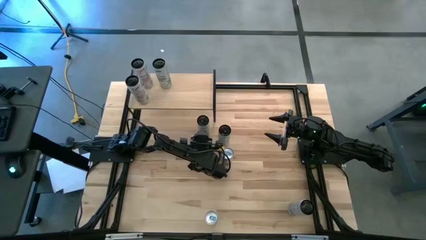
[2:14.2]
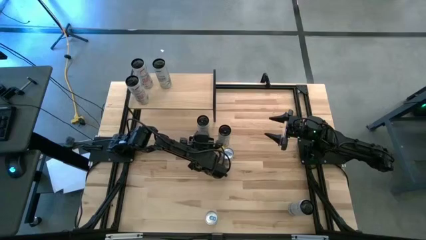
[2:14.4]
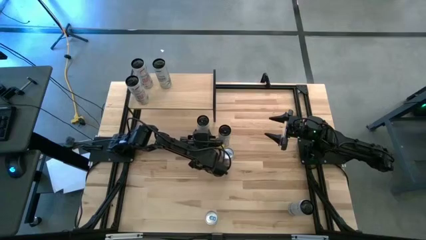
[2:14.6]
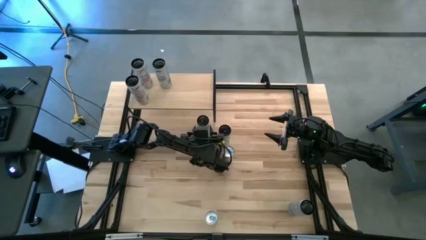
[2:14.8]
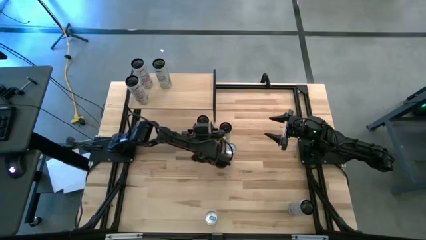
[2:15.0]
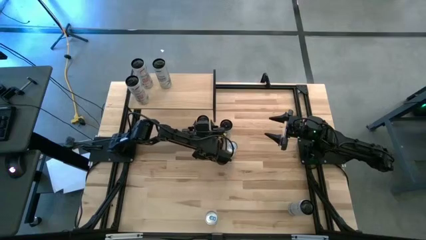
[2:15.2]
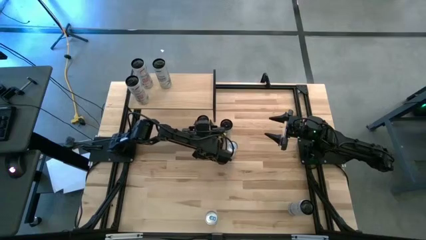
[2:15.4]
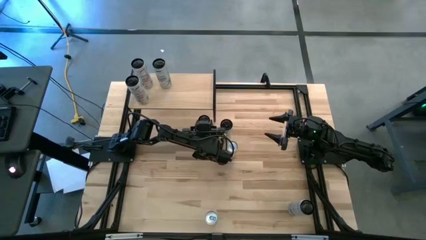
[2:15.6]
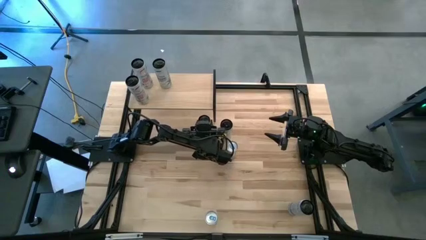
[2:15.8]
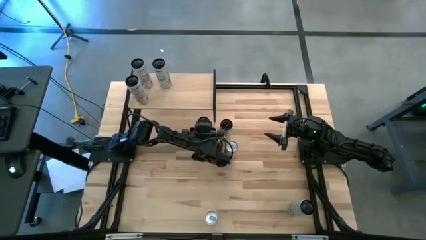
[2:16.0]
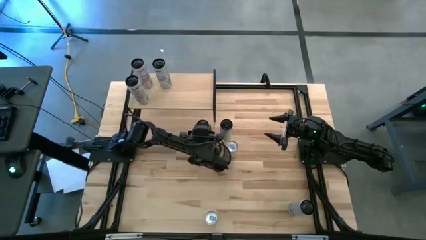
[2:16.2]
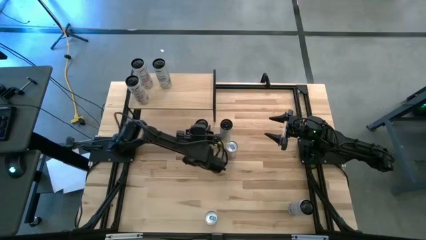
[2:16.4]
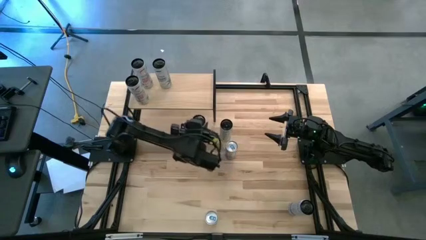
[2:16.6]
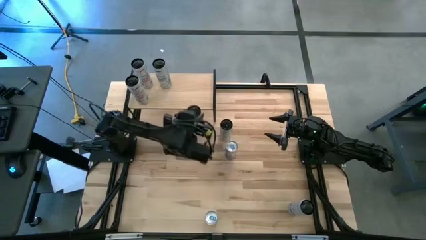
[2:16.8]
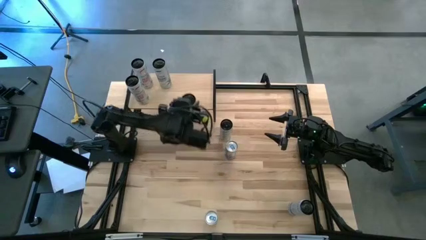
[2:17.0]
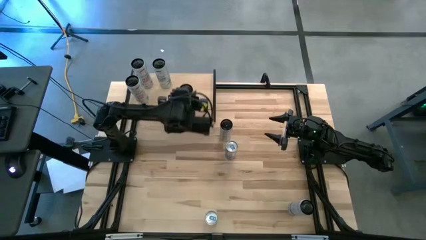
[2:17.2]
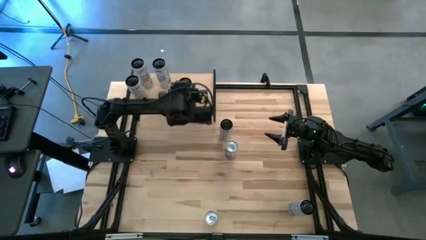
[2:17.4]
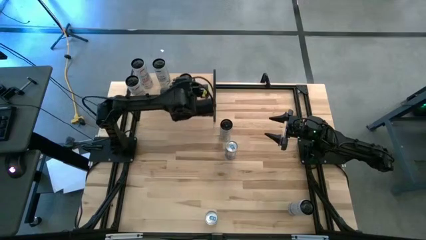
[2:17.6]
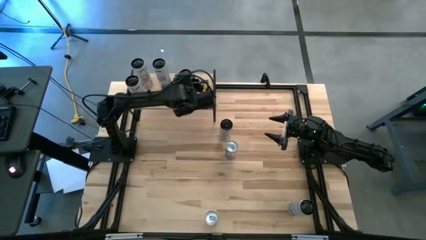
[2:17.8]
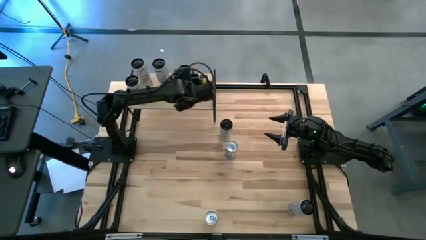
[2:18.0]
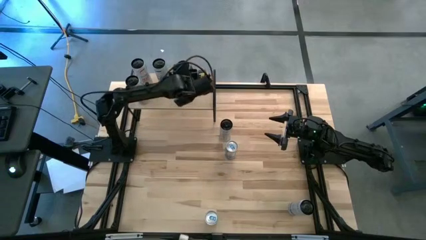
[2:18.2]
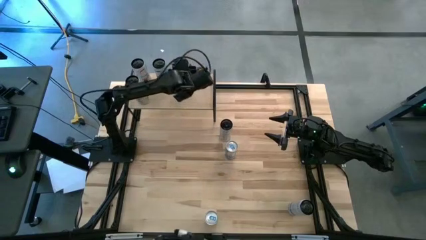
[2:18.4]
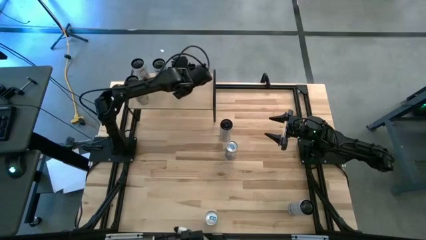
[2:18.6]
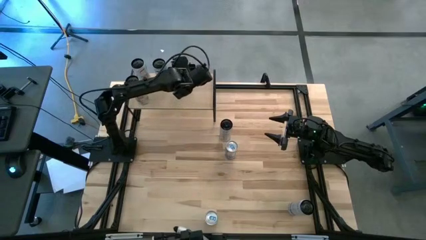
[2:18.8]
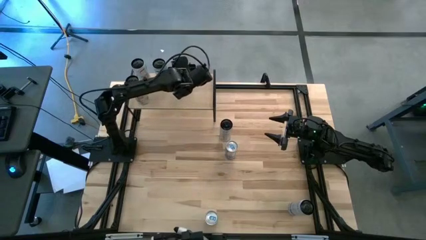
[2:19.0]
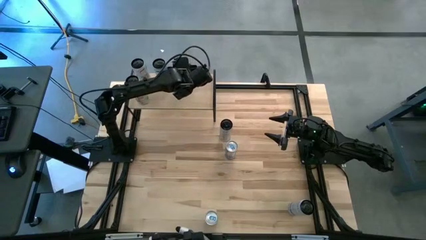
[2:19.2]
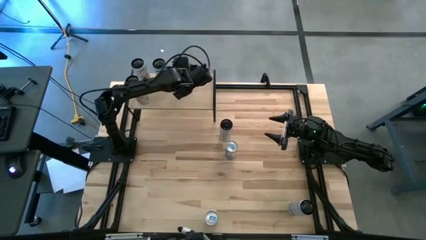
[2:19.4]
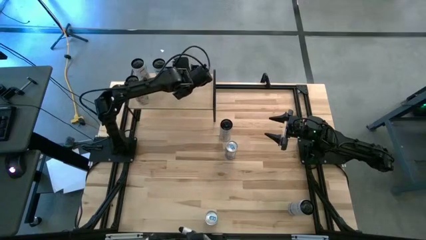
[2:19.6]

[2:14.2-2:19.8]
Task: Place canned beverage on shelf
Put the left white yellow soda can on the shelf

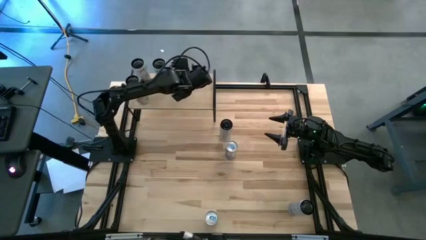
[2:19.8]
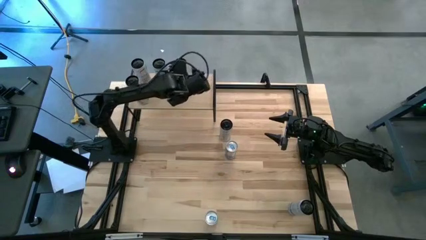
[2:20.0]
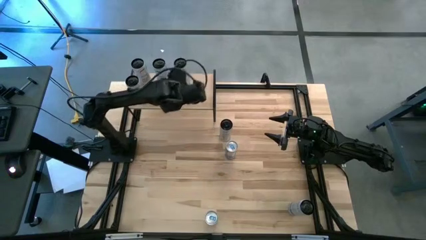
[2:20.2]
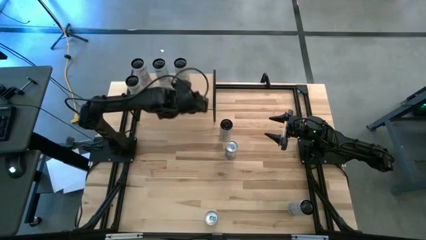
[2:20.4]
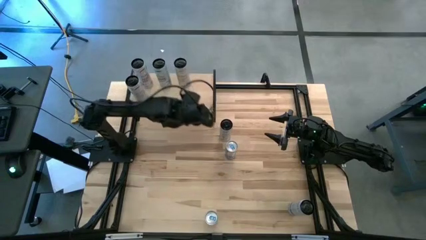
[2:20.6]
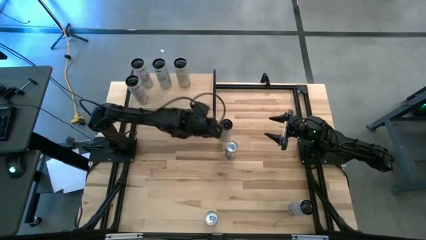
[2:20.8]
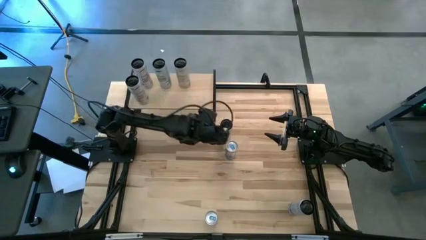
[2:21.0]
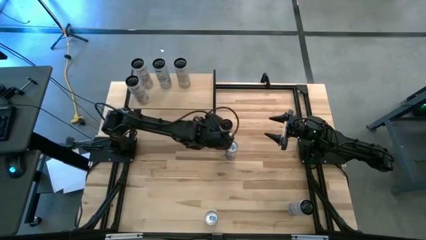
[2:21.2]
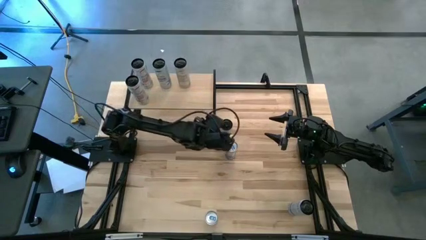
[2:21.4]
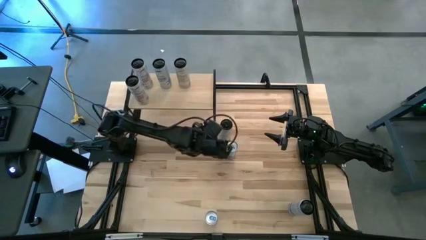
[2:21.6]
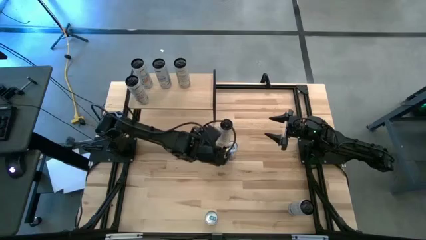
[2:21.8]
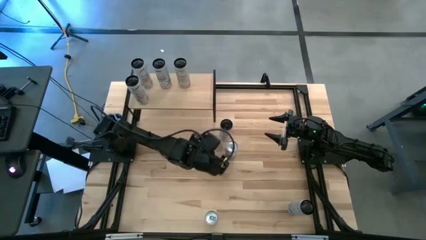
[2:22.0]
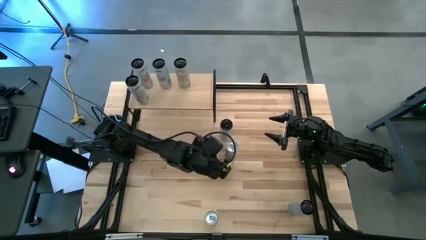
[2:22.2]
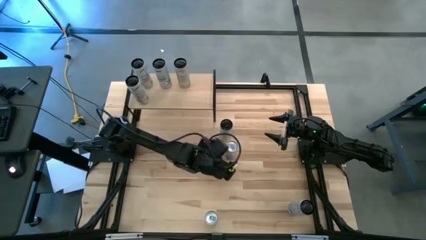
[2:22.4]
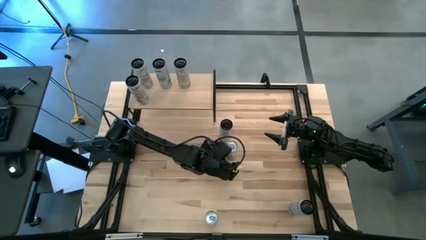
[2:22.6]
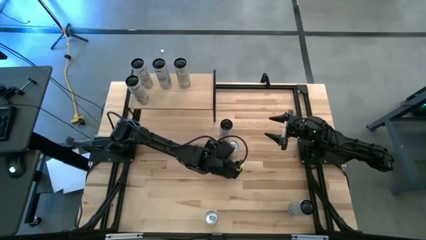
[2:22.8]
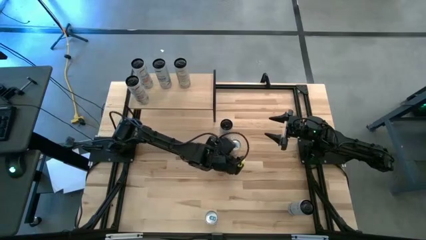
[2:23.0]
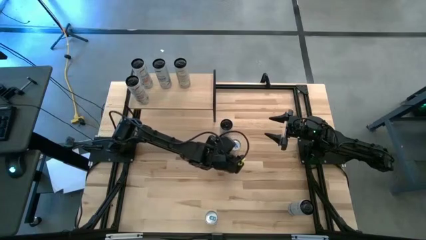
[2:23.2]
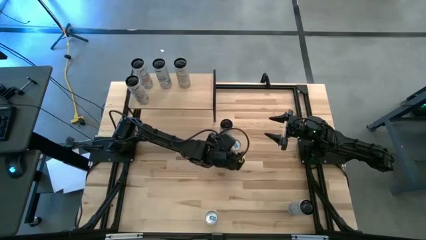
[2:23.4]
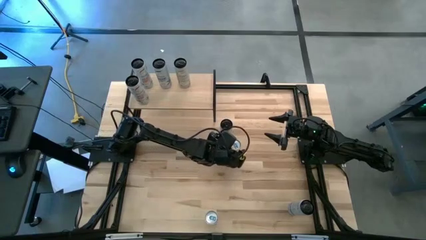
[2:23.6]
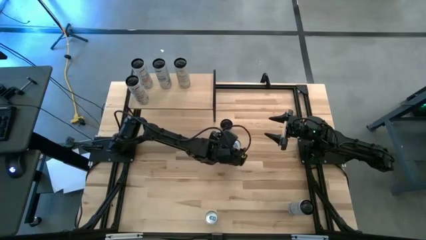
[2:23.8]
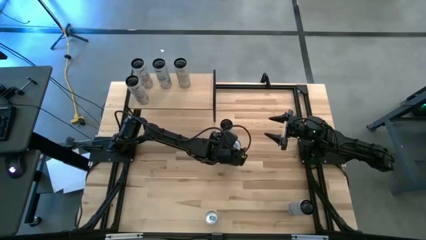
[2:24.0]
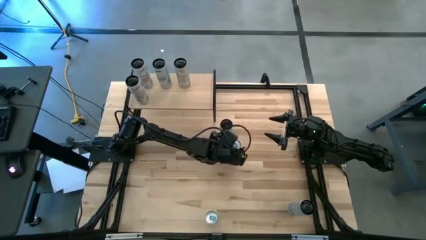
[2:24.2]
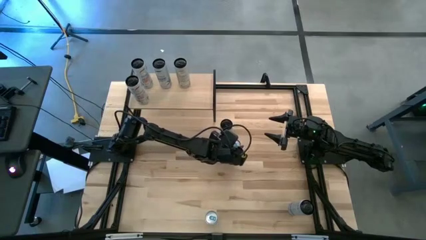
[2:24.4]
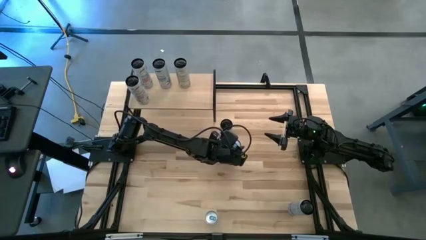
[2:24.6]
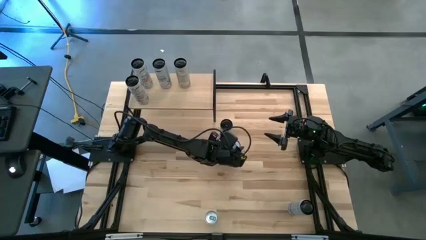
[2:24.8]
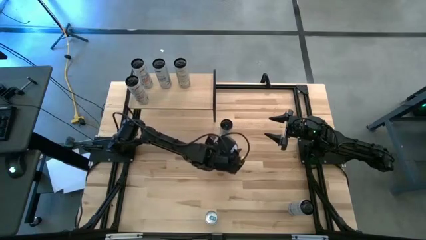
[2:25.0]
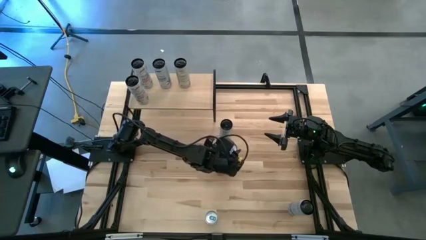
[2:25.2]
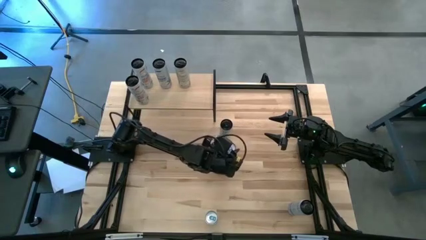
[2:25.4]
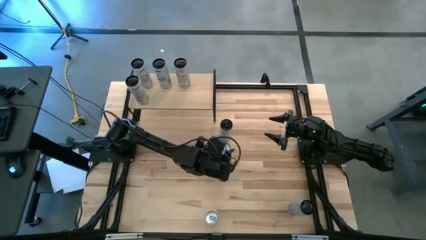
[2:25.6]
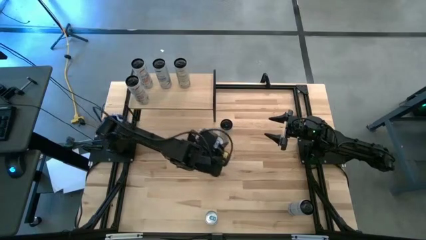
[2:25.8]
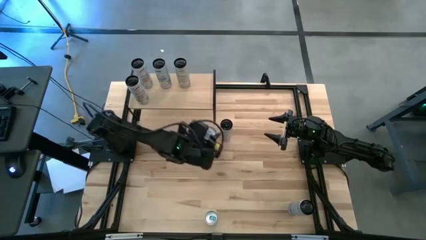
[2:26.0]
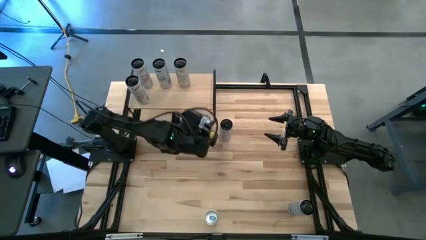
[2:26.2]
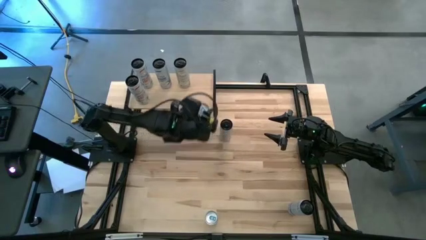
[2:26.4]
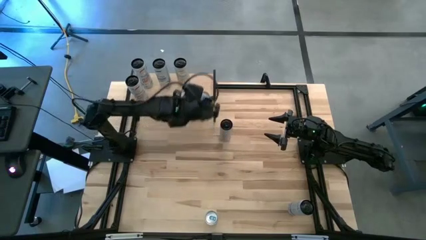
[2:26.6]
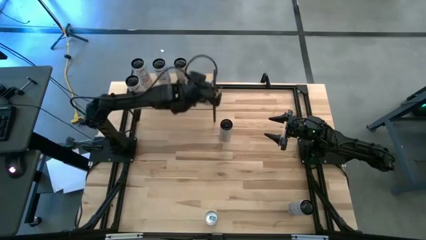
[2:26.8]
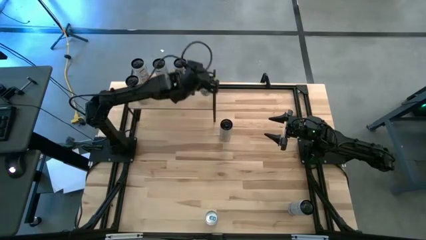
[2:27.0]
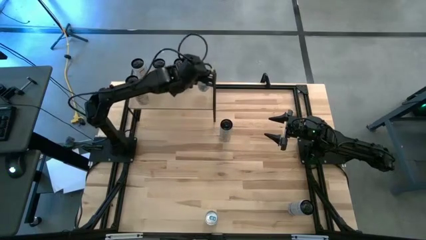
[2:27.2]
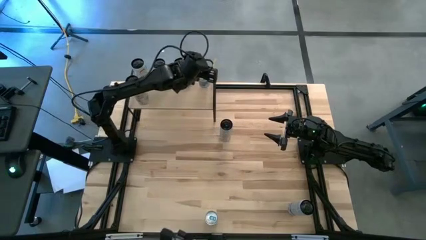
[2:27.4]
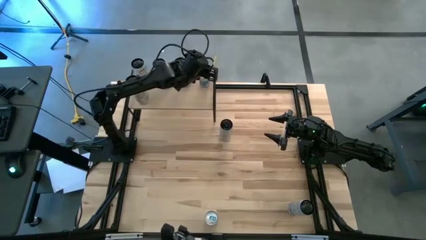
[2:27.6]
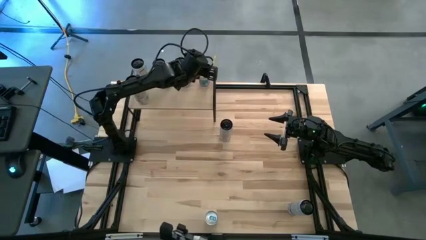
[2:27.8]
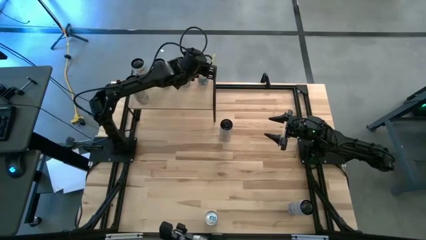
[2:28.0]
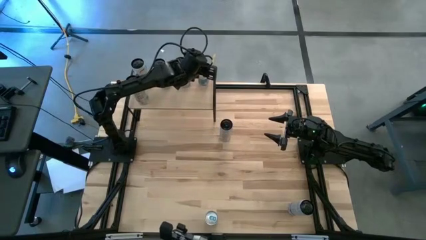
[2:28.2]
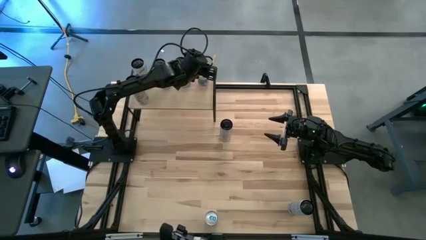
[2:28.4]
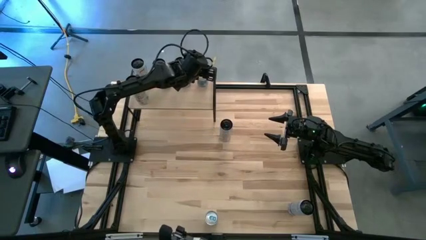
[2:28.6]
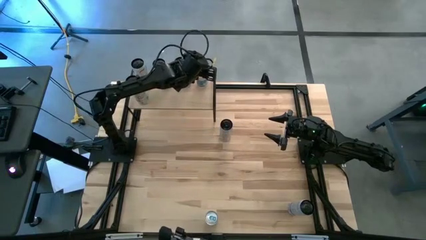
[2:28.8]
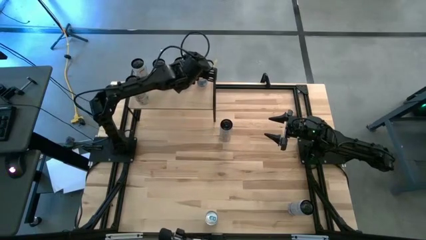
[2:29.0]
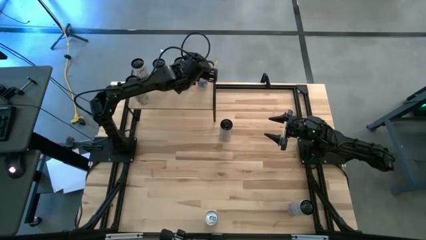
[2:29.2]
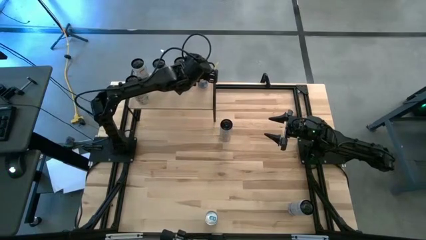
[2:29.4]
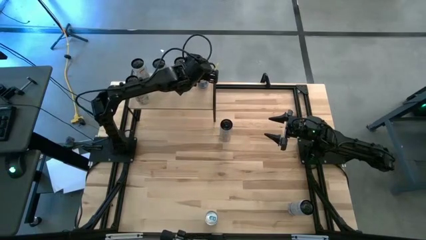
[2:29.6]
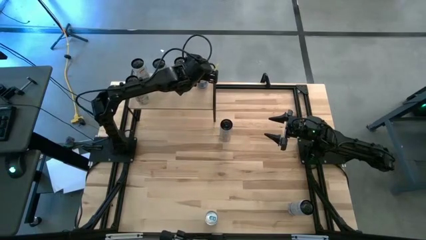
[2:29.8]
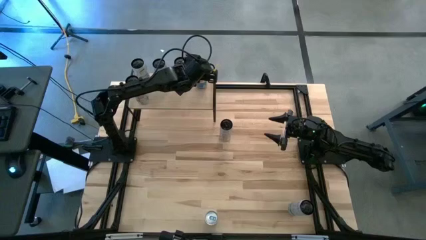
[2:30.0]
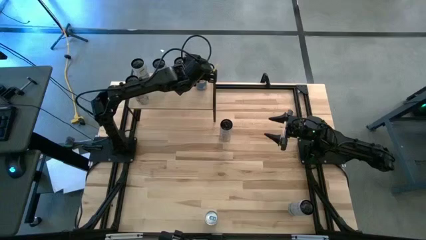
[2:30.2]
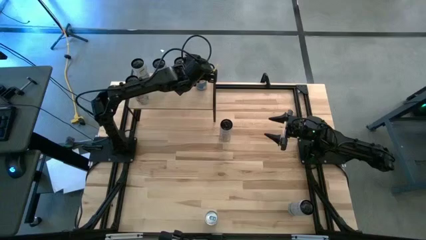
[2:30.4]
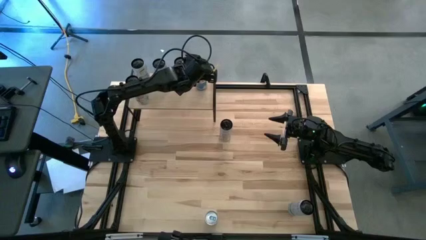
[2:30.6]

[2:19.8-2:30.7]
Put the top blue soda can on the shelf
